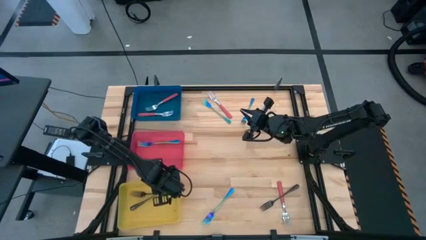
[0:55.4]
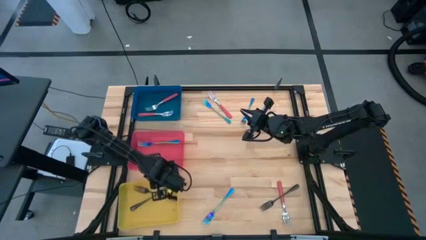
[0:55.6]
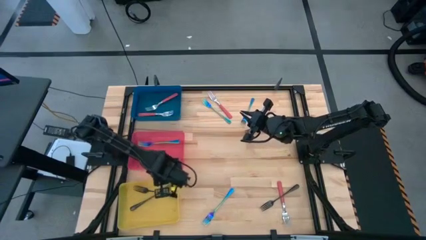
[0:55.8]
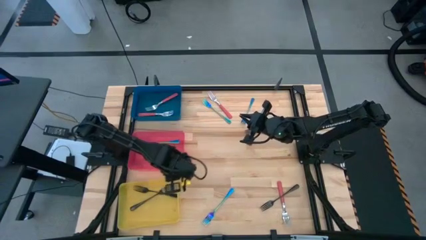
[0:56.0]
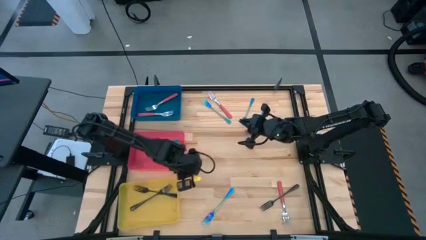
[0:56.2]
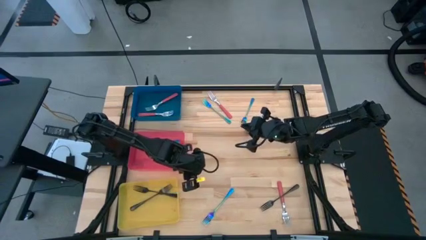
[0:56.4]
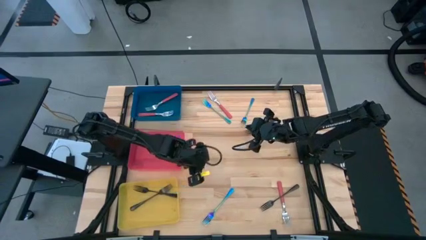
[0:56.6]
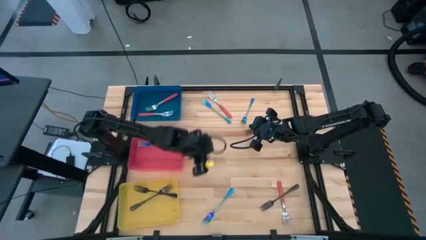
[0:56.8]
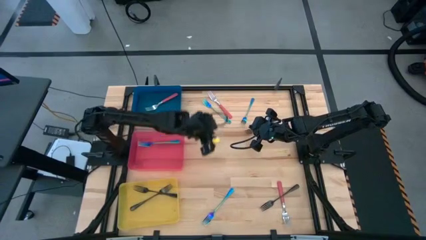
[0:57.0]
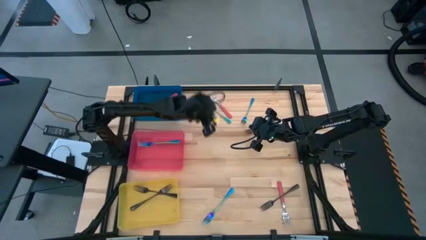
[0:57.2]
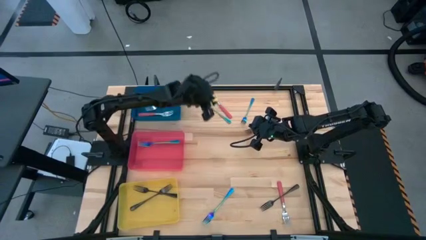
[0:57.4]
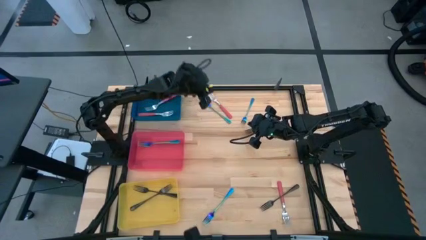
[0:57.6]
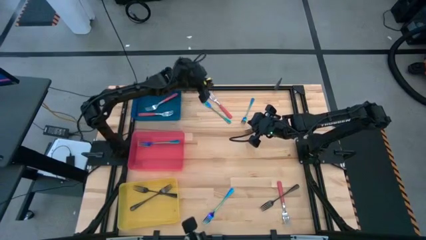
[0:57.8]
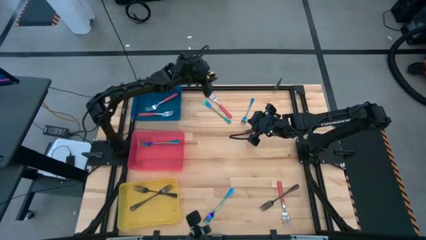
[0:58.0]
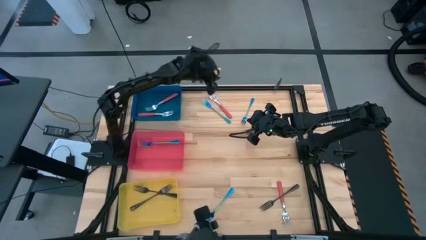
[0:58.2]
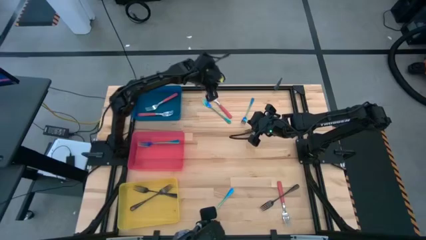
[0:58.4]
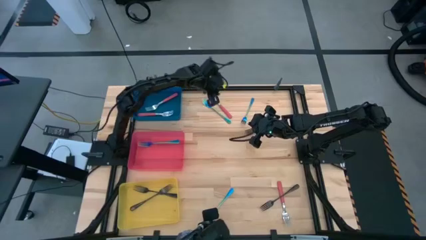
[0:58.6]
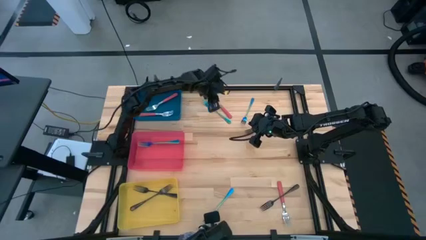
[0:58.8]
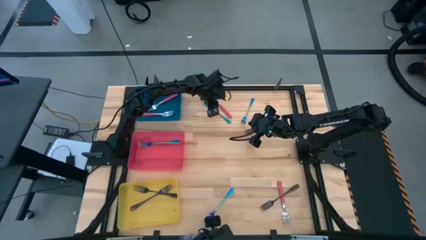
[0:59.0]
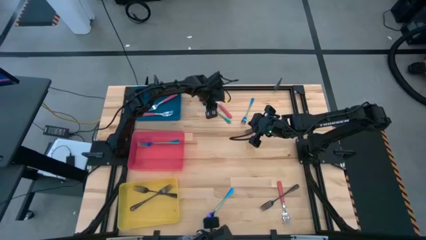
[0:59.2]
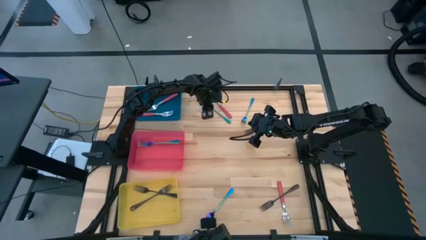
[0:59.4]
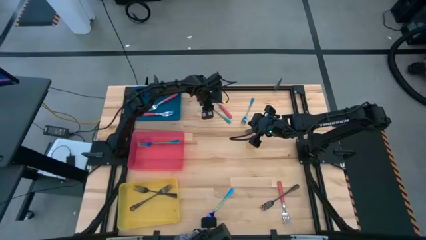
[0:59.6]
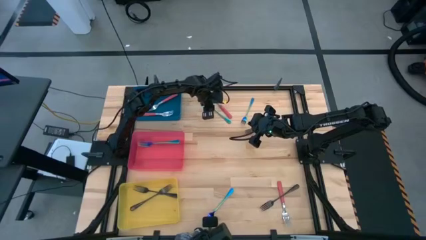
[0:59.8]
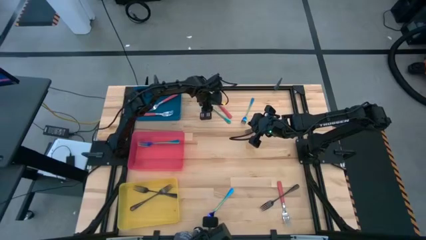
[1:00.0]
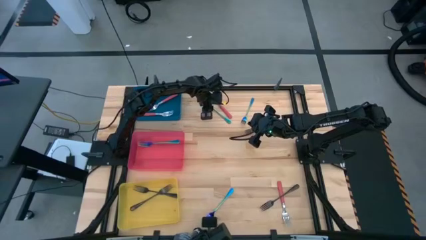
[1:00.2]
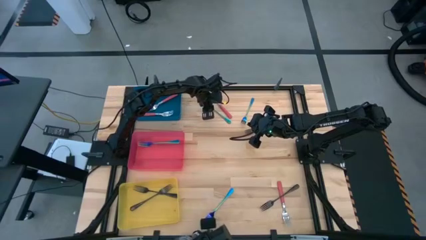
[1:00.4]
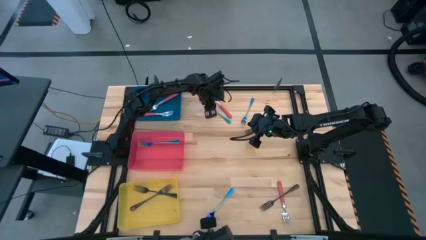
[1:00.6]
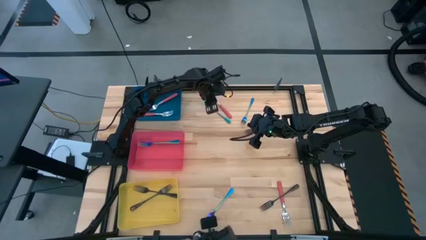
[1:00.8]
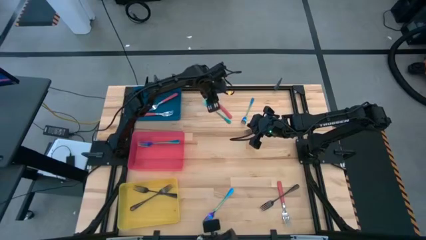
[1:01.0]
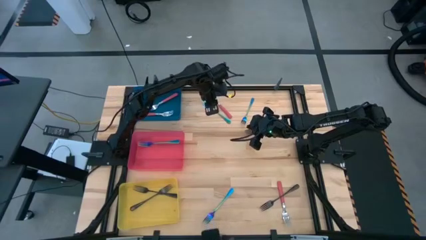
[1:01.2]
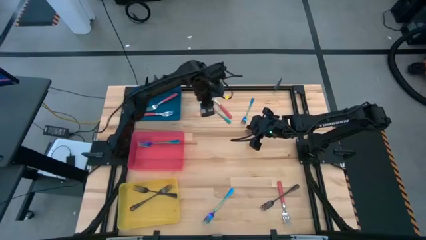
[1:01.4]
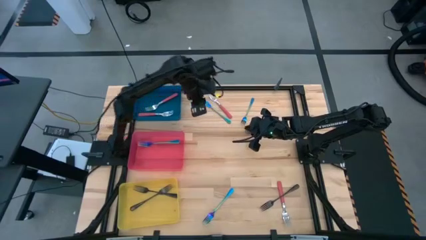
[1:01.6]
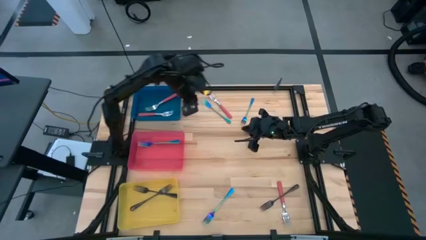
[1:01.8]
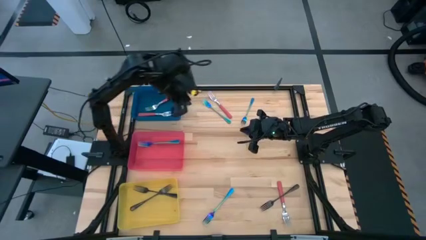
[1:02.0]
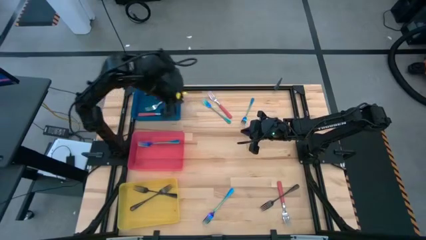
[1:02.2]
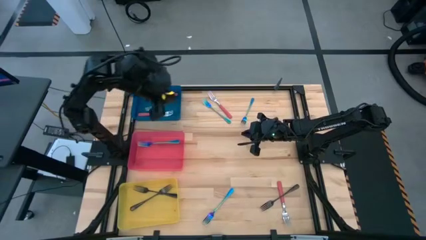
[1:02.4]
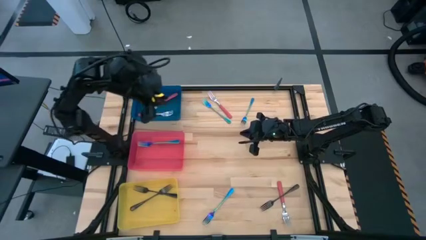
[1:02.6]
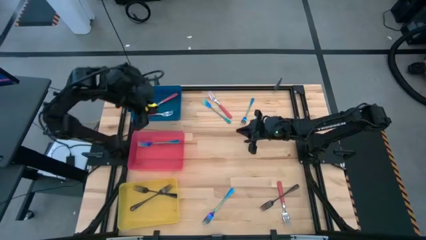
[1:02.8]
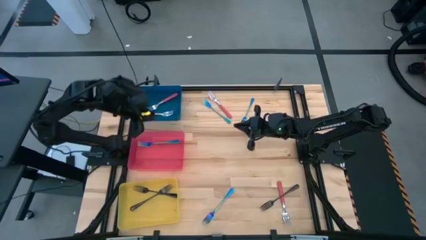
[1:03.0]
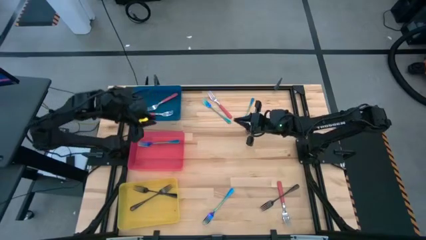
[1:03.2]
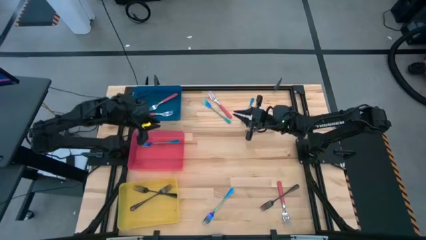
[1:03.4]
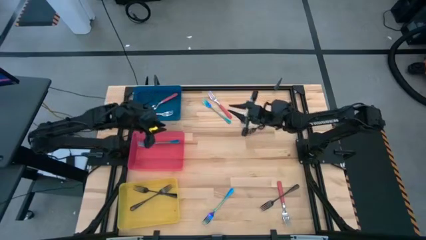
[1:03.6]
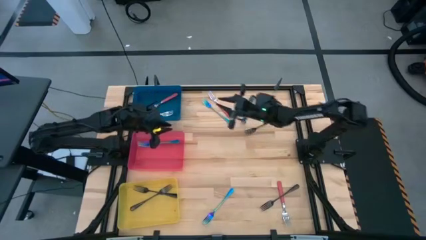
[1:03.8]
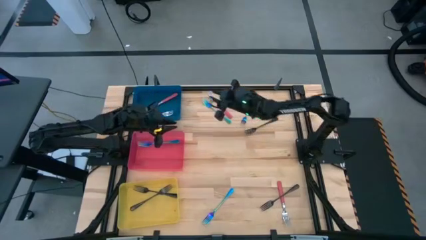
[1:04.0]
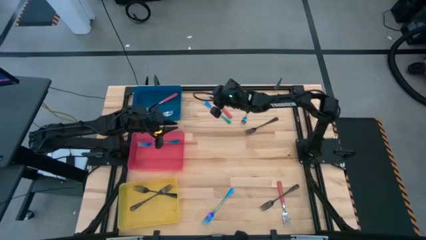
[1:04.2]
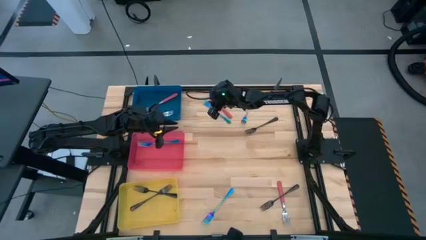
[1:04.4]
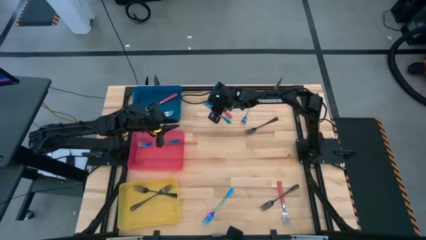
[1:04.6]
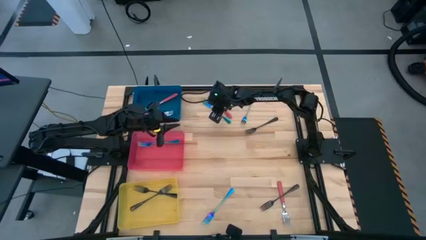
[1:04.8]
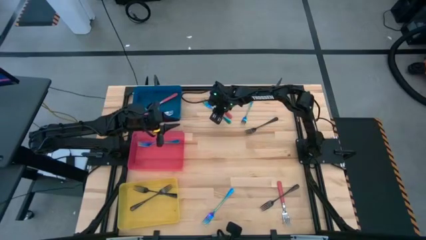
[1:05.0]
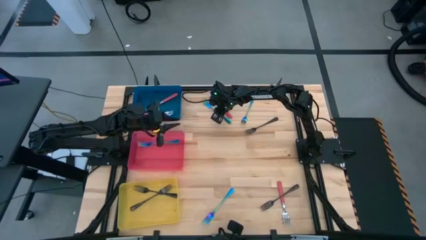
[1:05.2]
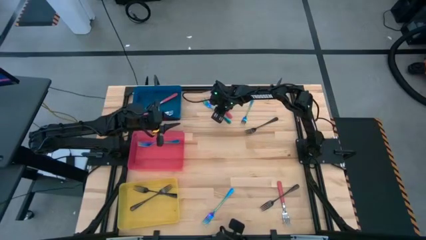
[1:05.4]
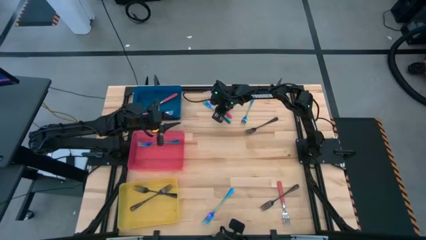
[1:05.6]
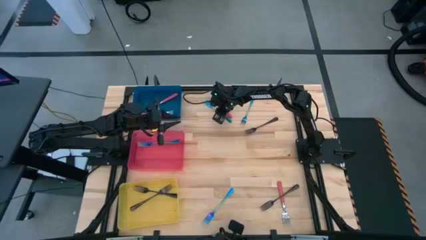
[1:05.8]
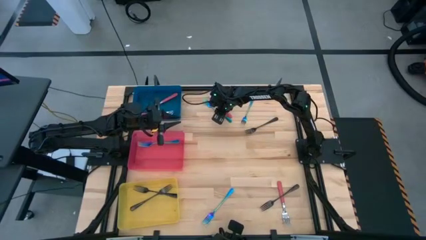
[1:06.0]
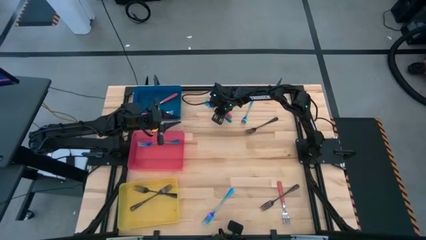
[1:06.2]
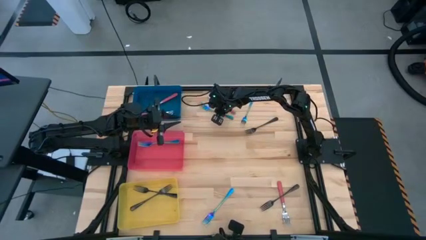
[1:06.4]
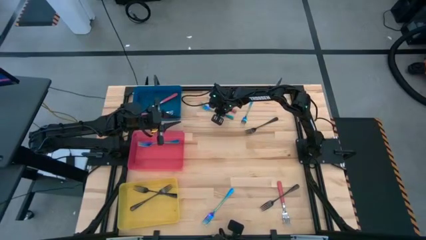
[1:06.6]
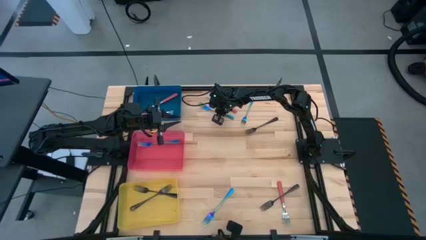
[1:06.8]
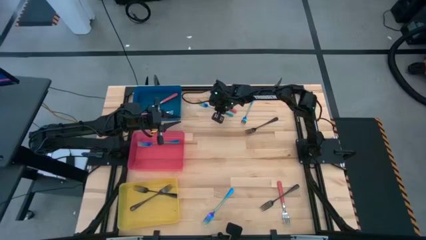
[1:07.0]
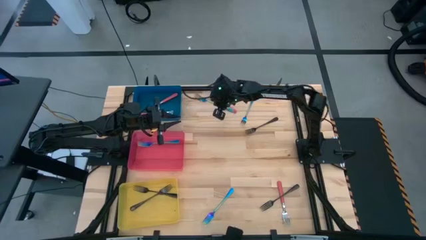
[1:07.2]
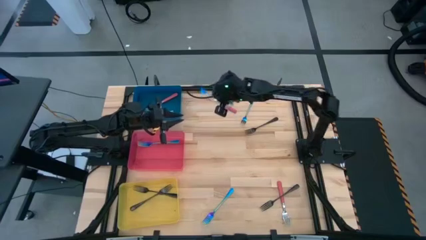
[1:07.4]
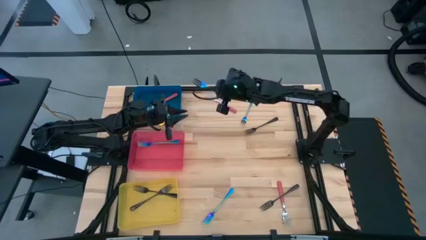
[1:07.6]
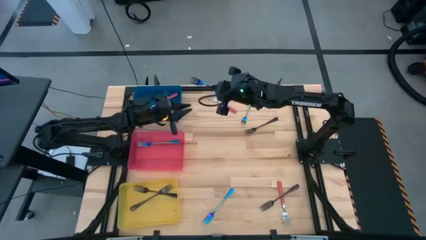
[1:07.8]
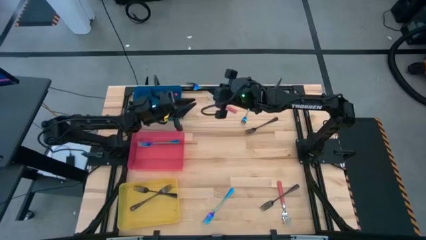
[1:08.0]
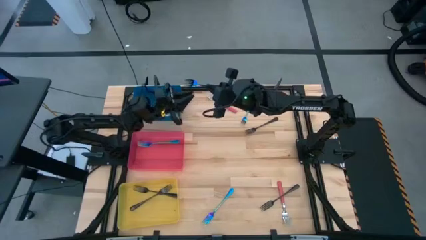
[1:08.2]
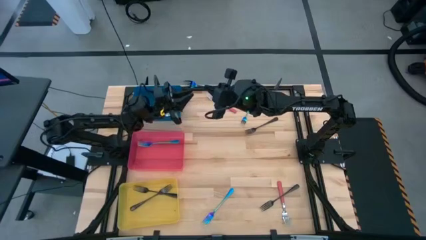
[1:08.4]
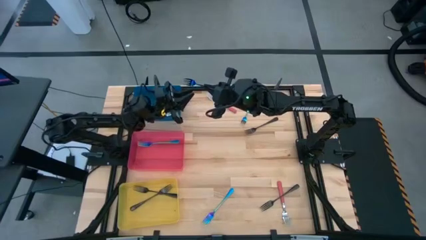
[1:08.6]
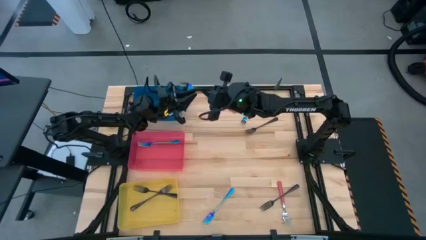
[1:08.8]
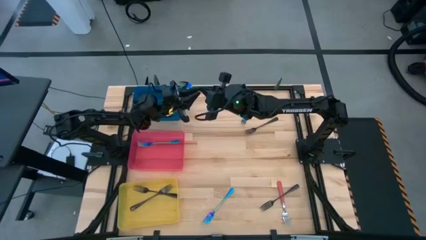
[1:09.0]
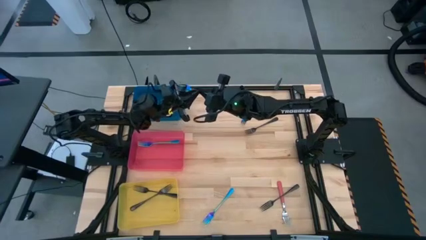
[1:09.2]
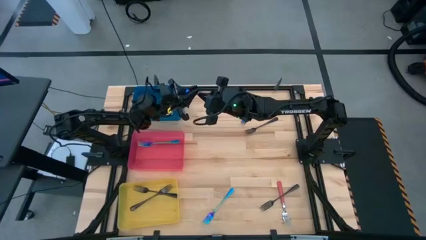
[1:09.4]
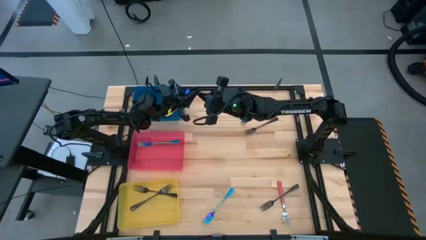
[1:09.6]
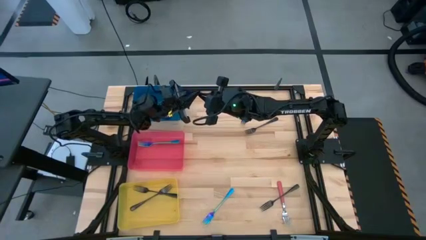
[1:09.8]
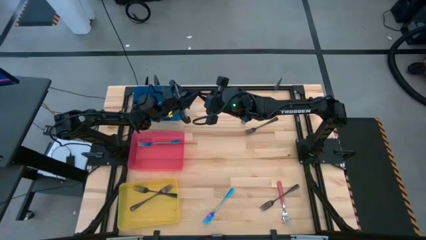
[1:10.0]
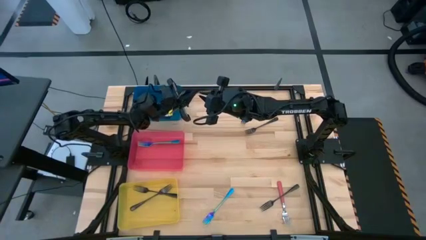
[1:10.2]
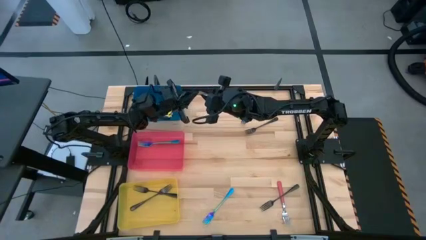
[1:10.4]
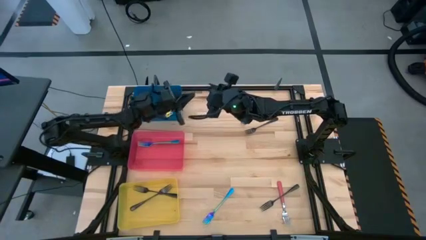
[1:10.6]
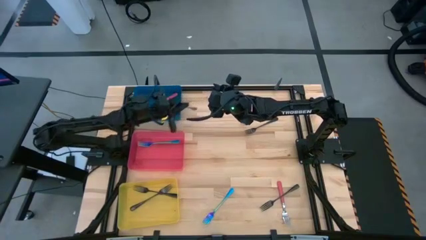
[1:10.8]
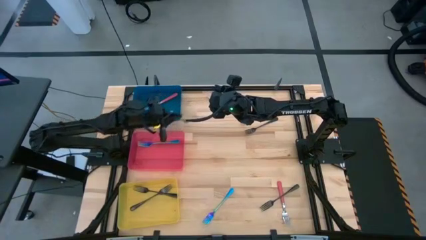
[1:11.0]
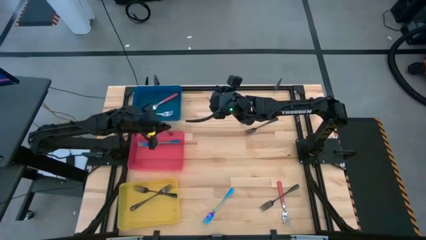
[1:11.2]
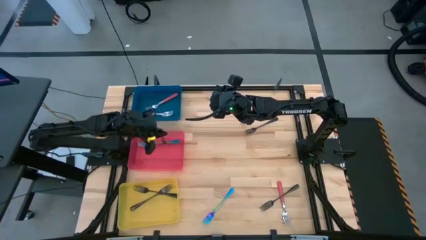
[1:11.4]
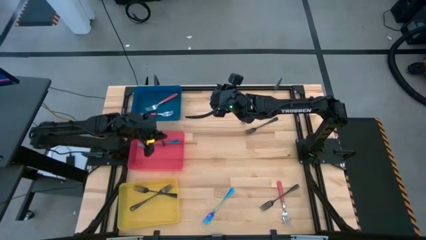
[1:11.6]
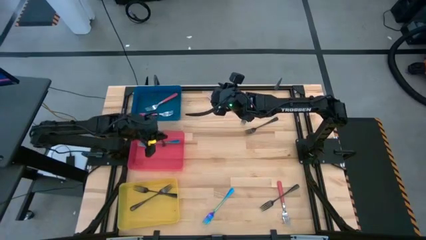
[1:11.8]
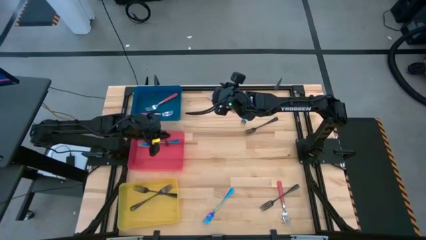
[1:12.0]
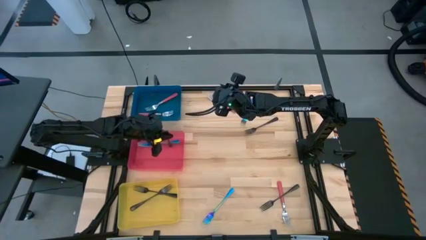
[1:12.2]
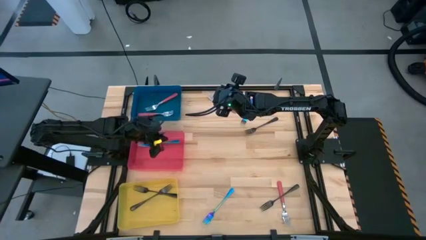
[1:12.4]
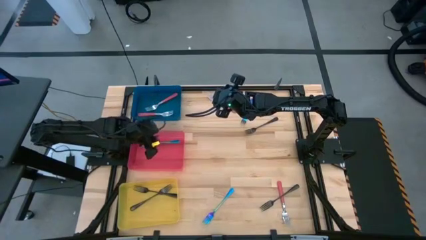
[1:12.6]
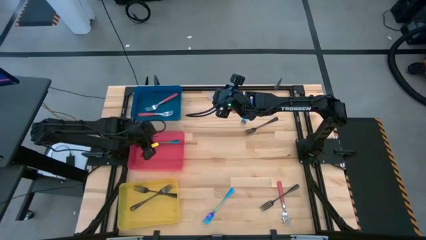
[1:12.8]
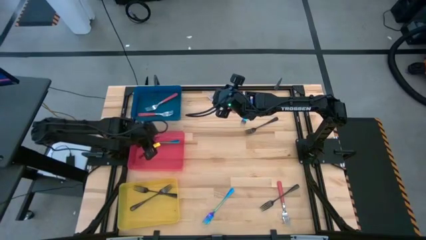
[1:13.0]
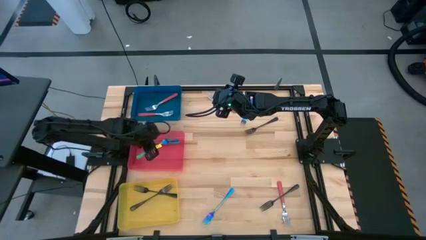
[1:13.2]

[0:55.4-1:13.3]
Task: Sort silverware by color (type)
Put the blue fork into the pink bin
